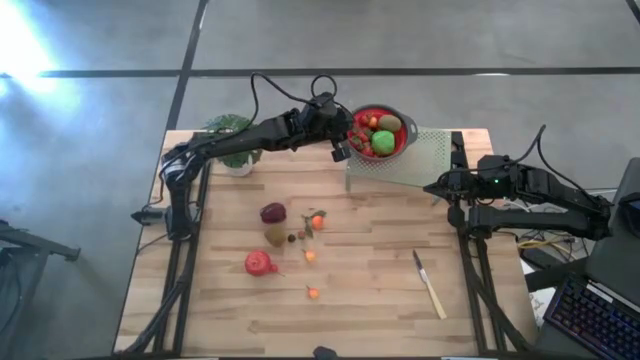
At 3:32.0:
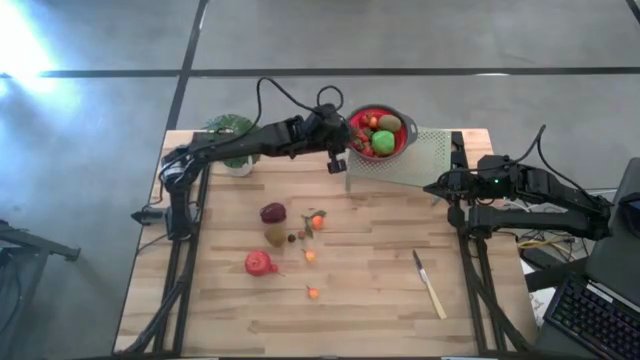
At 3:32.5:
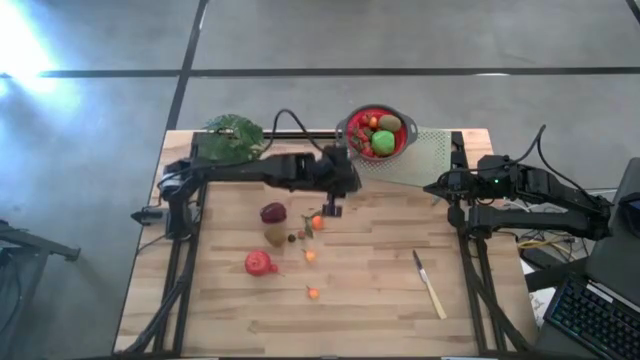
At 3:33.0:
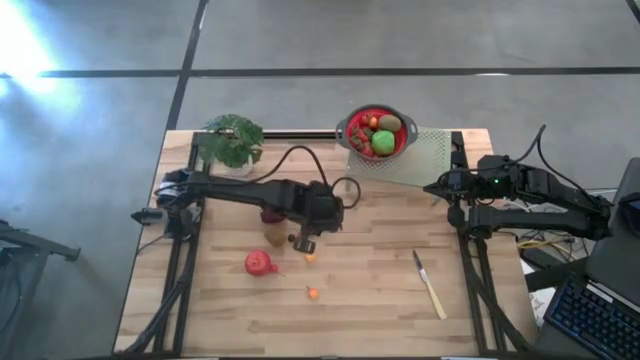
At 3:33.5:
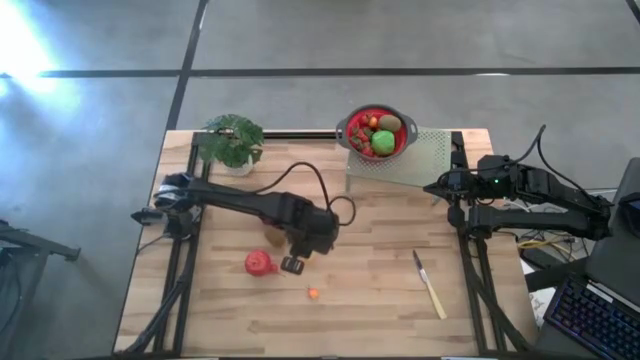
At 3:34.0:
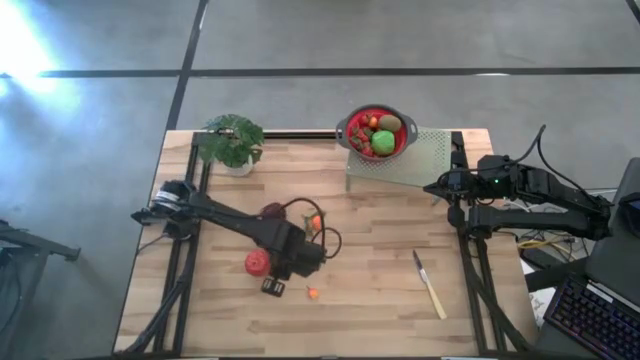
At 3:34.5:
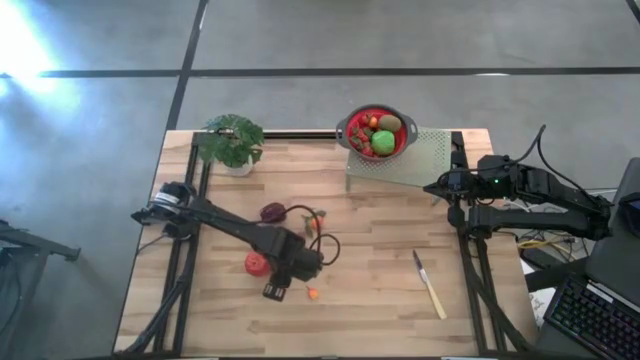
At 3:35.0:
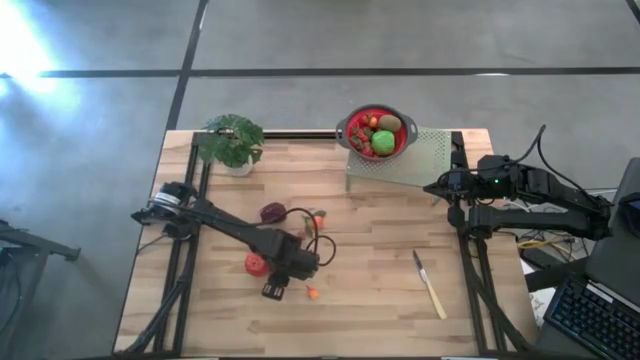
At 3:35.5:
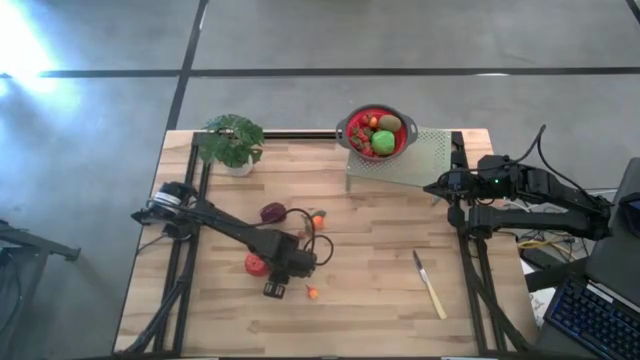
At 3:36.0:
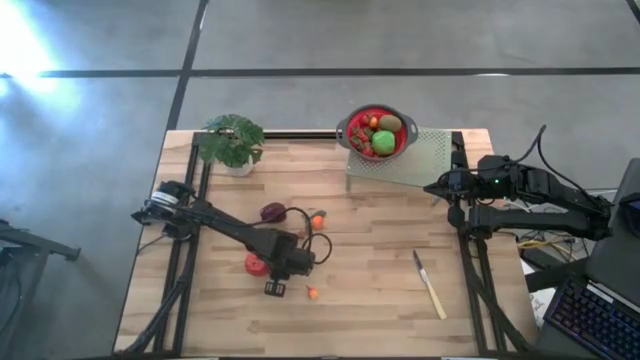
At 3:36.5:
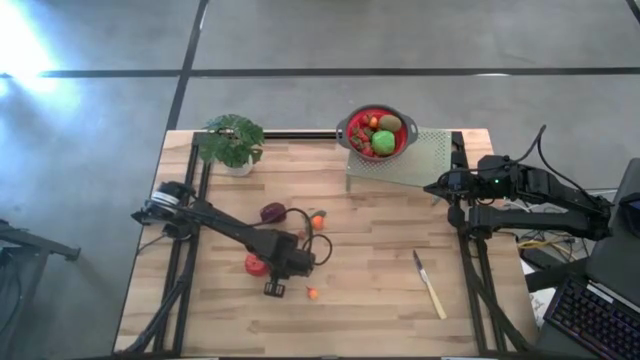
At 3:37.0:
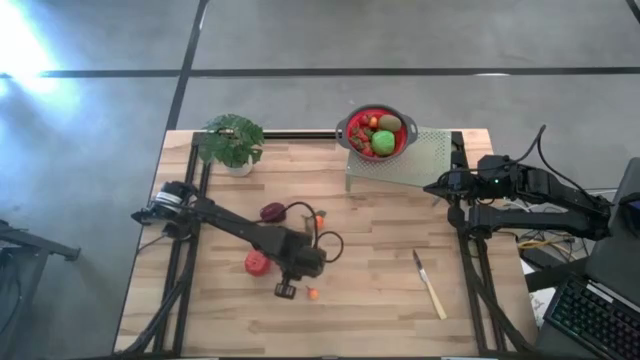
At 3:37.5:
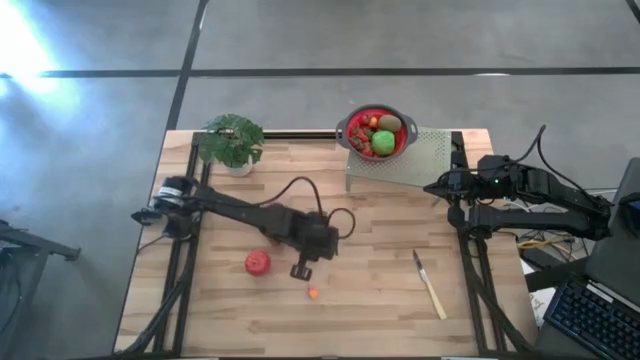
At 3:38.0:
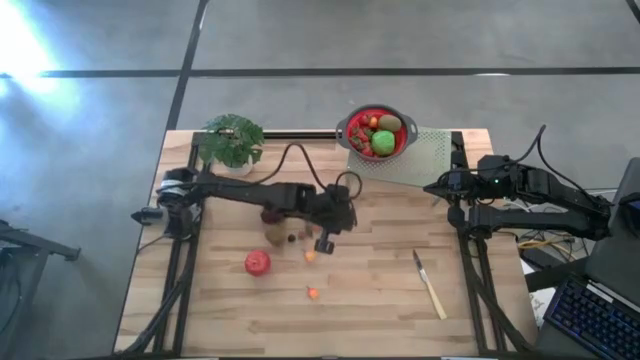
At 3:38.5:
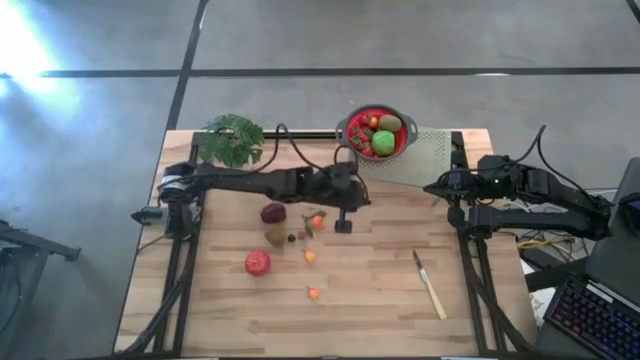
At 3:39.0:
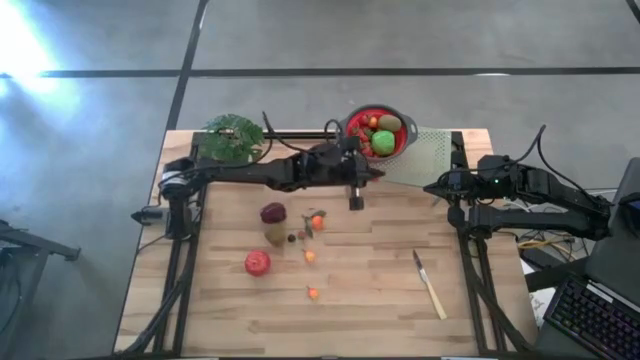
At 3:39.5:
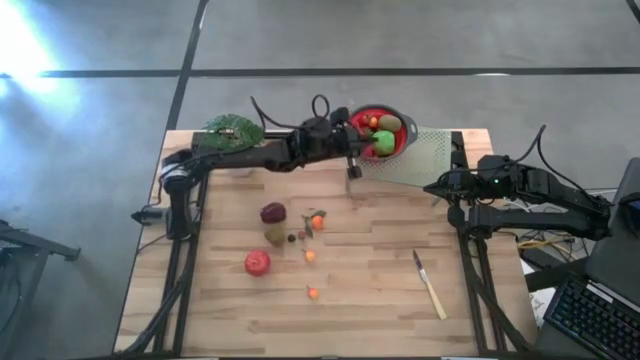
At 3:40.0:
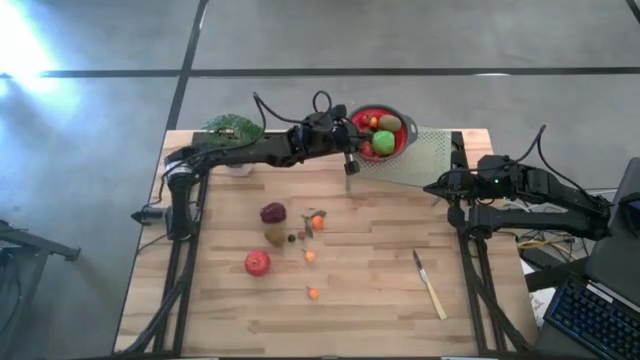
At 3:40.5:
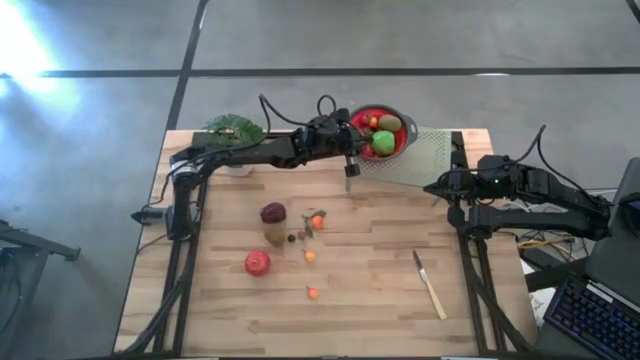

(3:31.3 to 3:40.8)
Task: Pick & Place Fruit
Put the red cherry into the strainer bowl on the shelf

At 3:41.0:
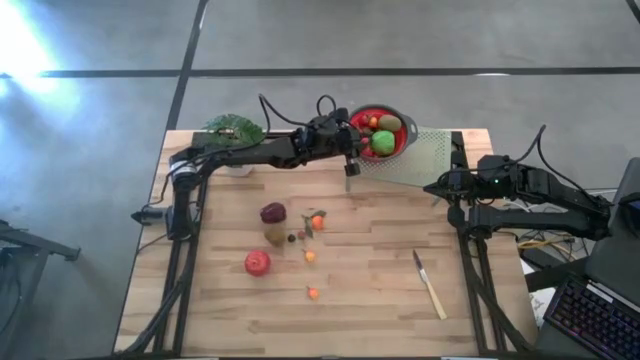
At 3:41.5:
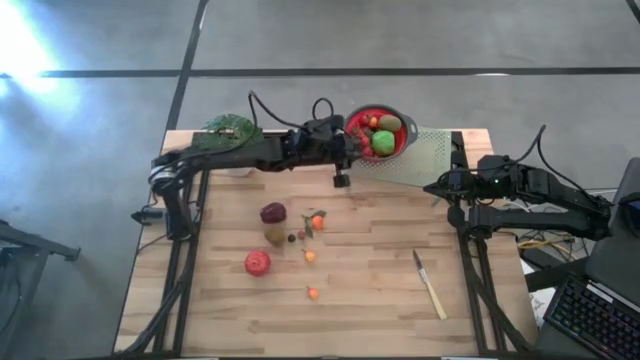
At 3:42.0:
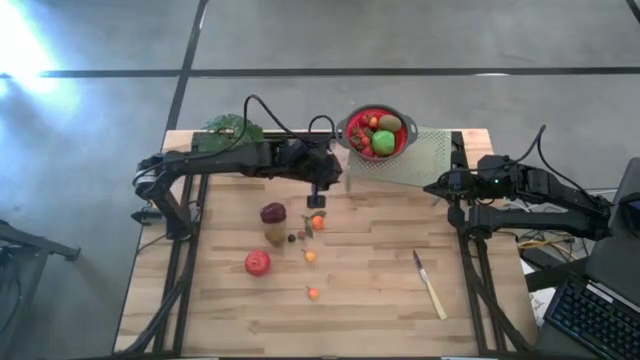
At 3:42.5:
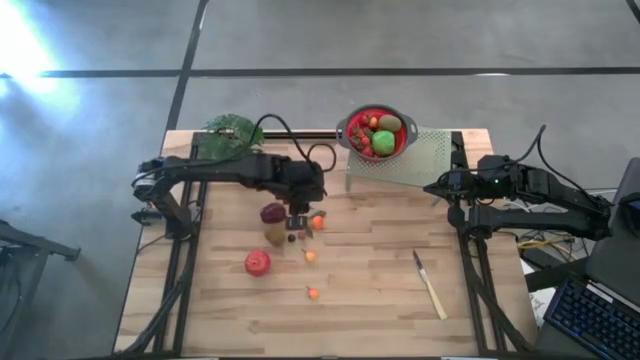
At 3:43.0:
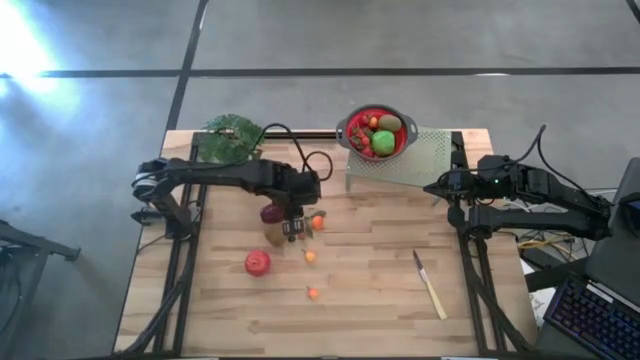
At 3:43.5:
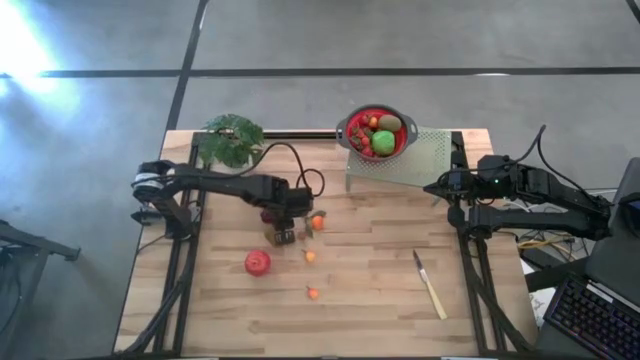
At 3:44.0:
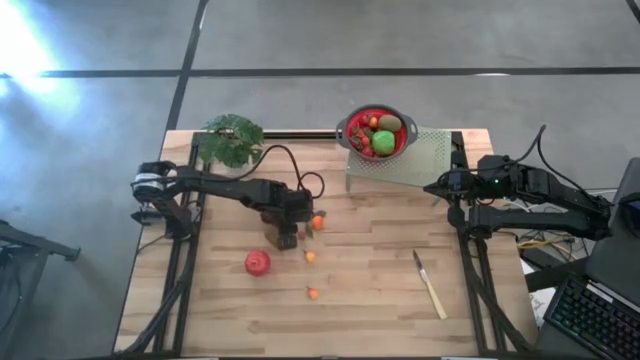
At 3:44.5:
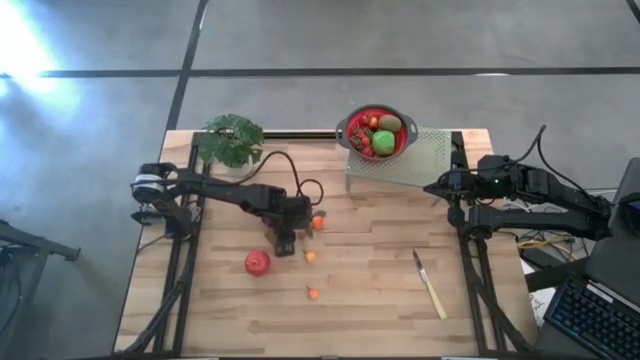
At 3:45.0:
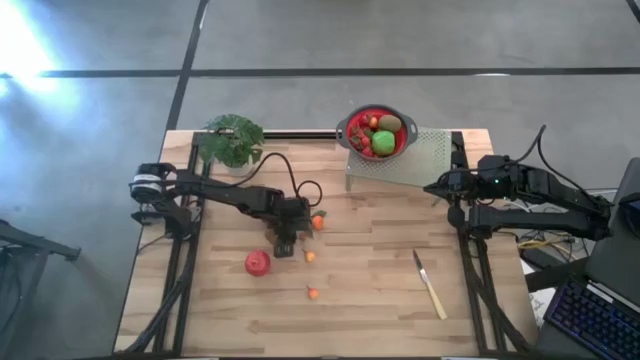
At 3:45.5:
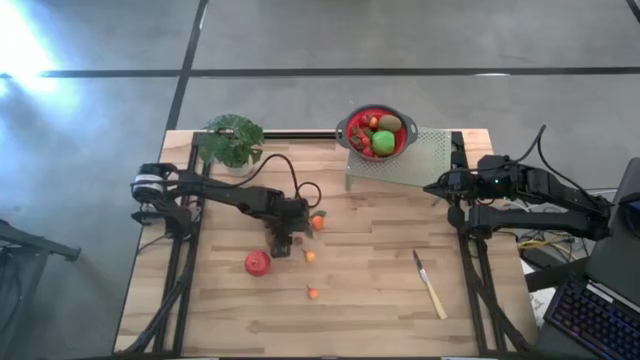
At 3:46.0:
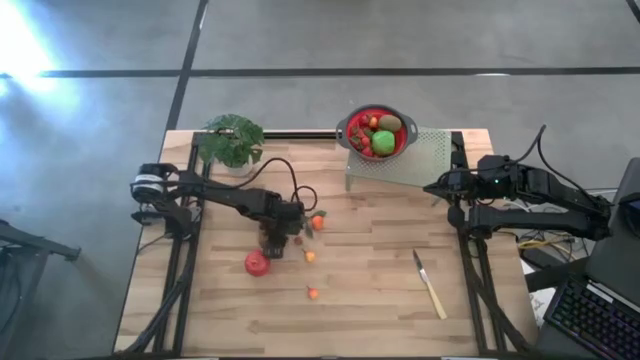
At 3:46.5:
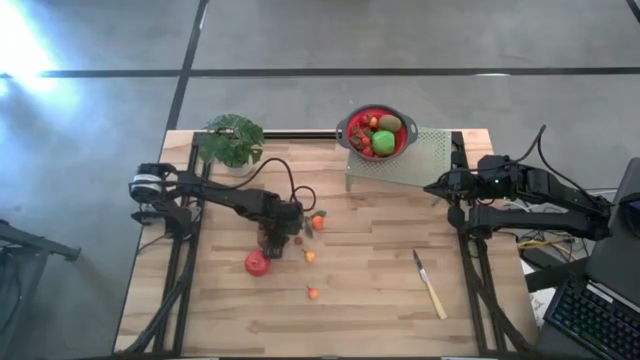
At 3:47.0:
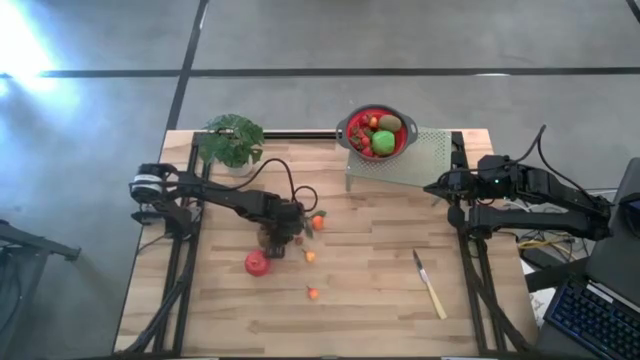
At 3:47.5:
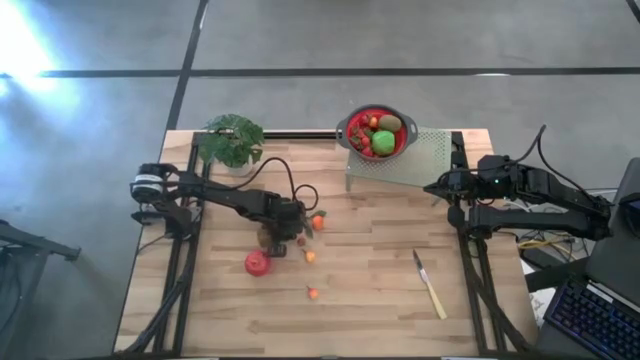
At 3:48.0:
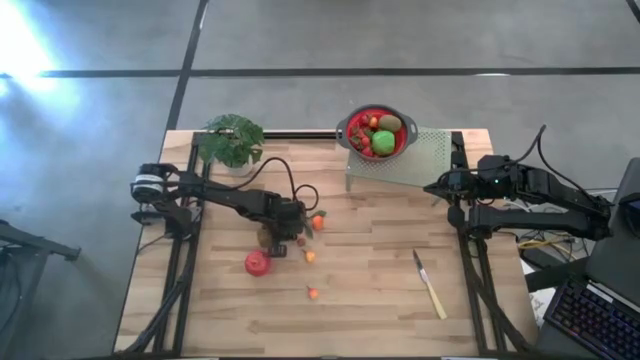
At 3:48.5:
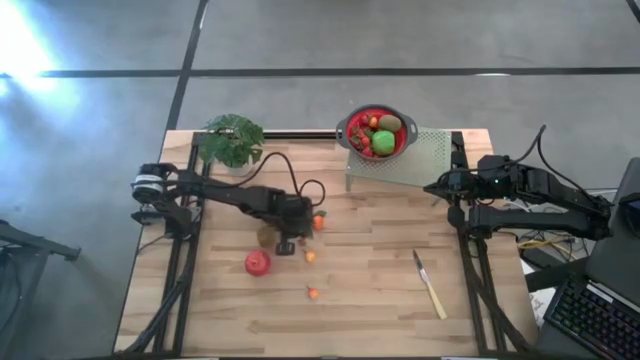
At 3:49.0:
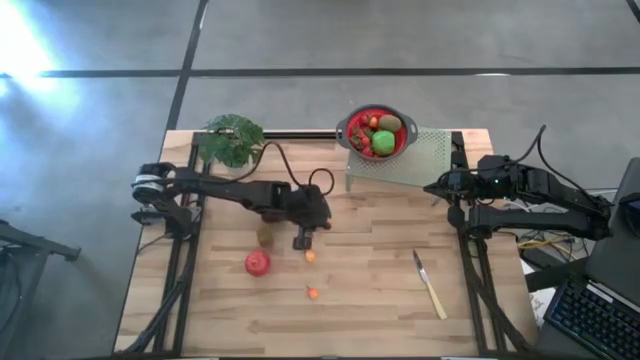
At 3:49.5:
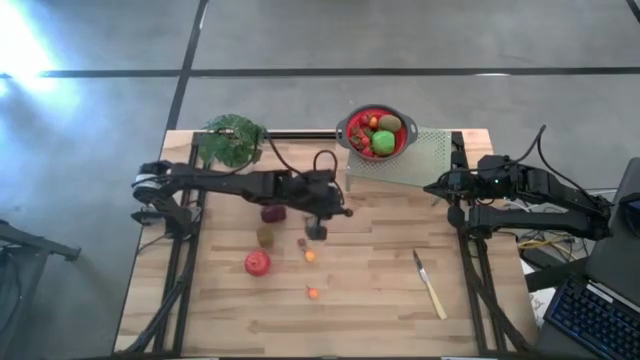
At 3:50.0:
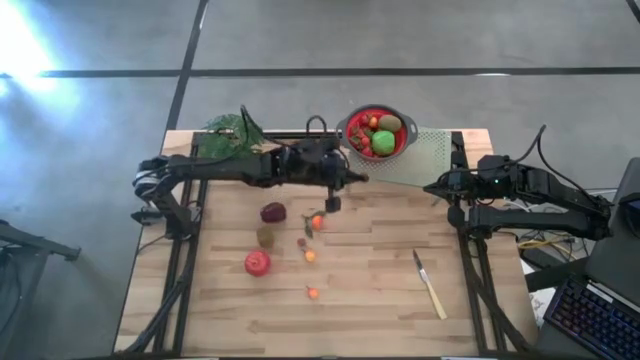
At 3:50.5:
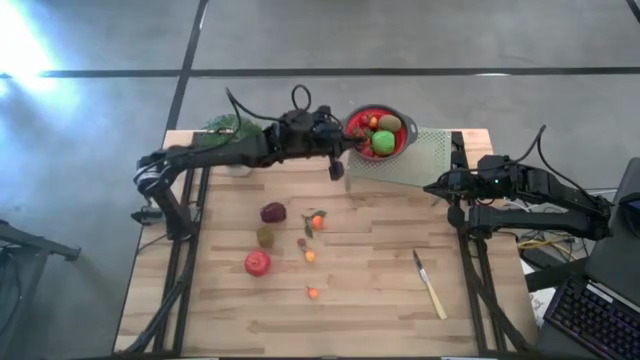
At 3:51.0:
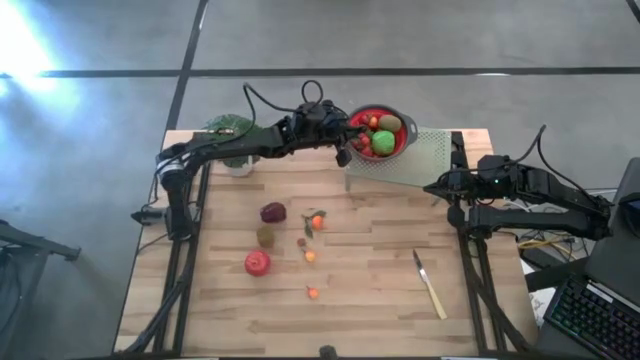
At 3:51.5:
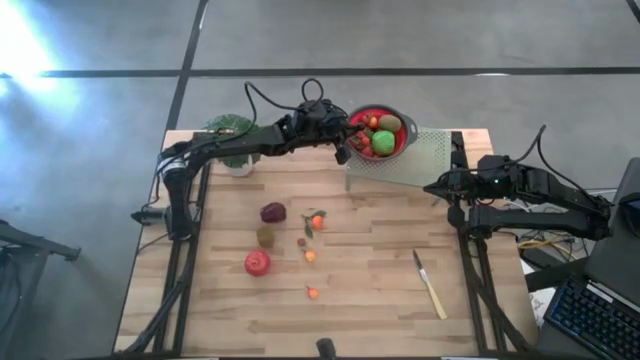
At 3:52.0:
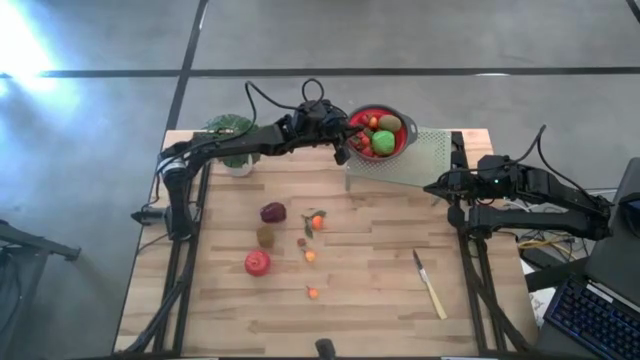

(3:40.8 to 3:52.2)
Put the black cherry into the strainer bowl on the shelf
